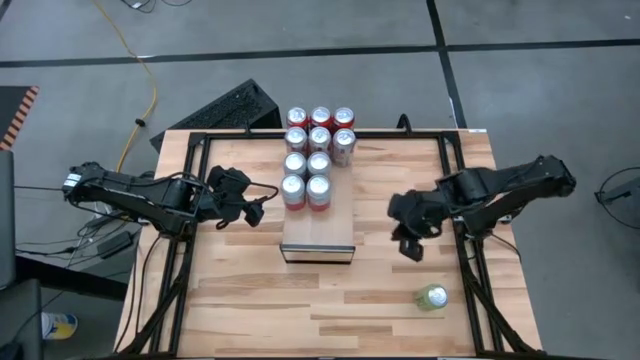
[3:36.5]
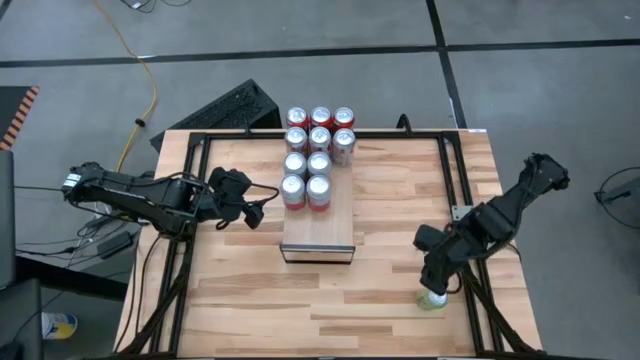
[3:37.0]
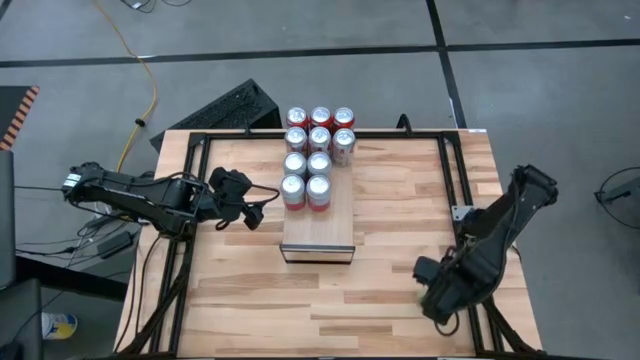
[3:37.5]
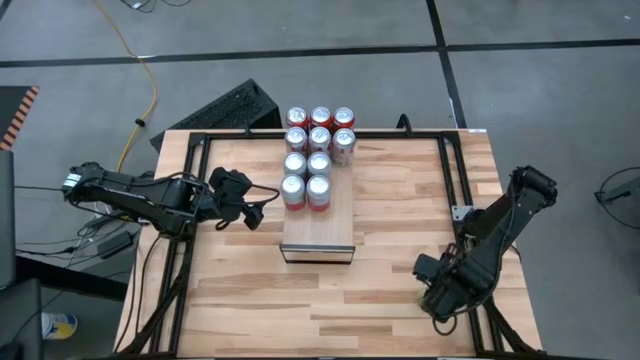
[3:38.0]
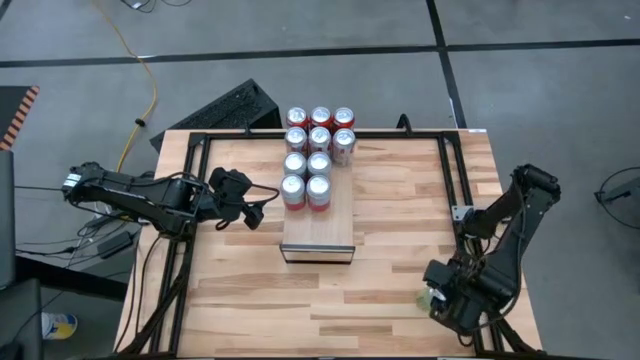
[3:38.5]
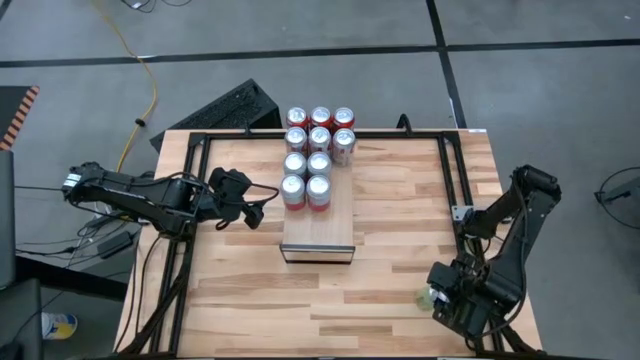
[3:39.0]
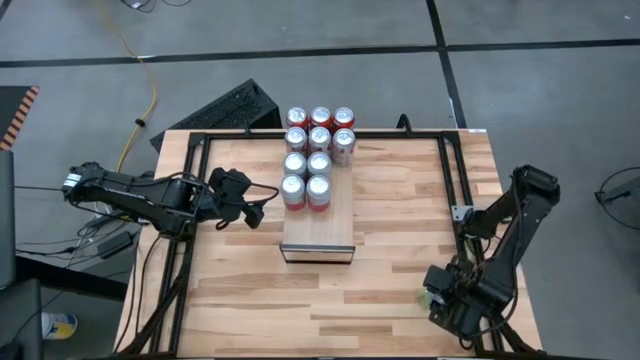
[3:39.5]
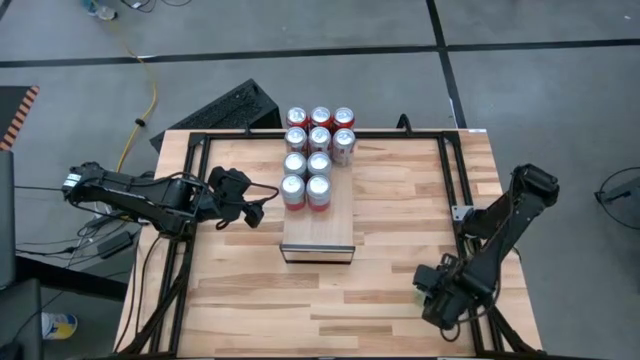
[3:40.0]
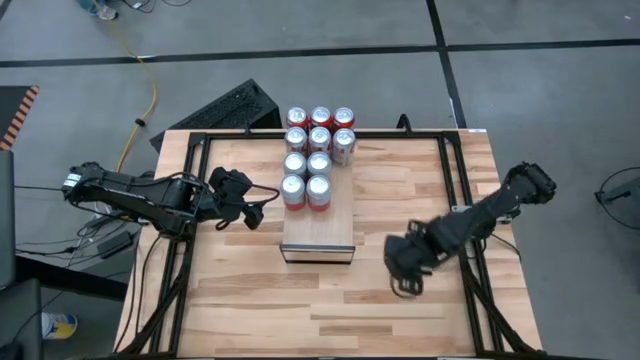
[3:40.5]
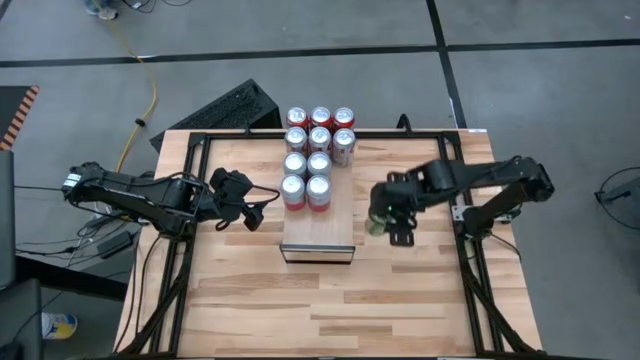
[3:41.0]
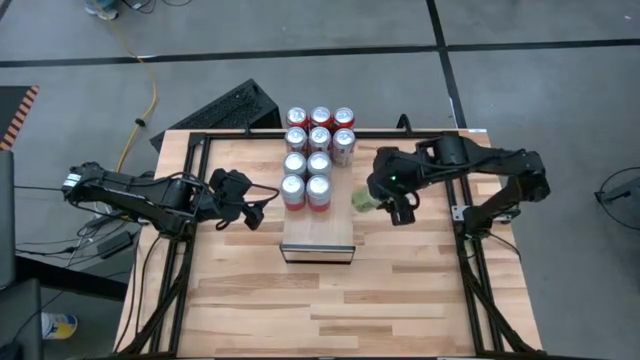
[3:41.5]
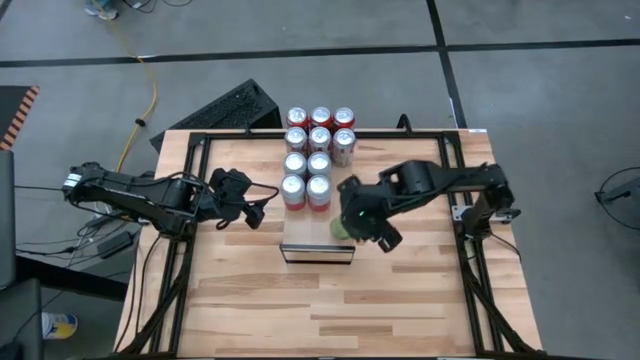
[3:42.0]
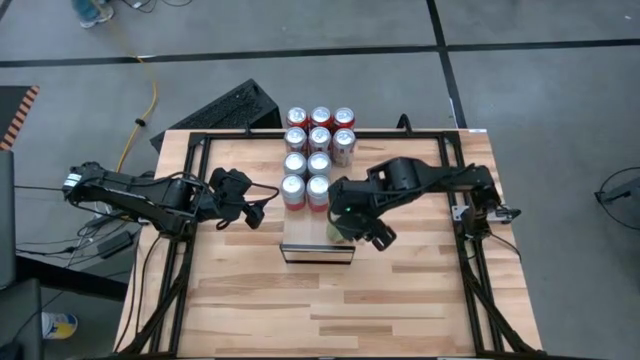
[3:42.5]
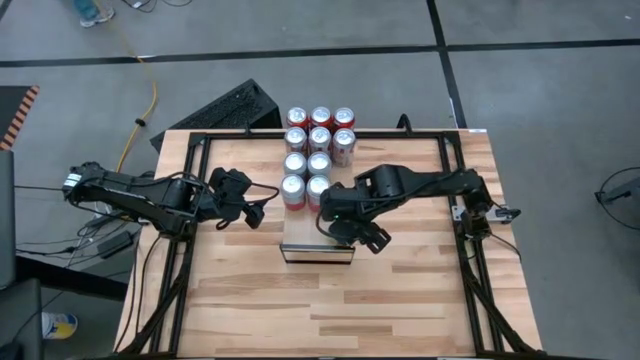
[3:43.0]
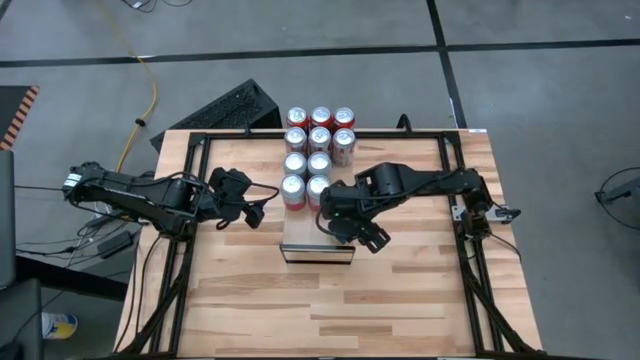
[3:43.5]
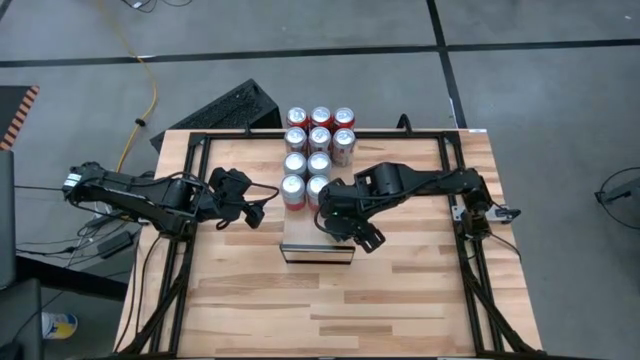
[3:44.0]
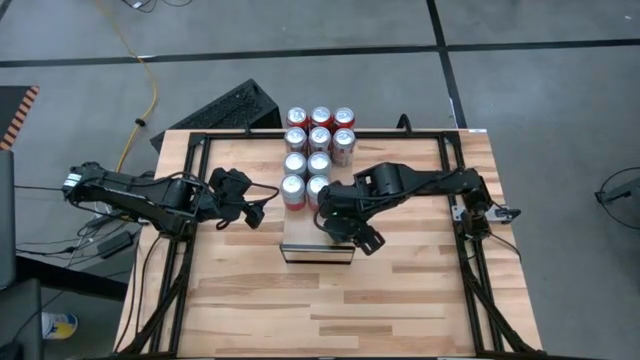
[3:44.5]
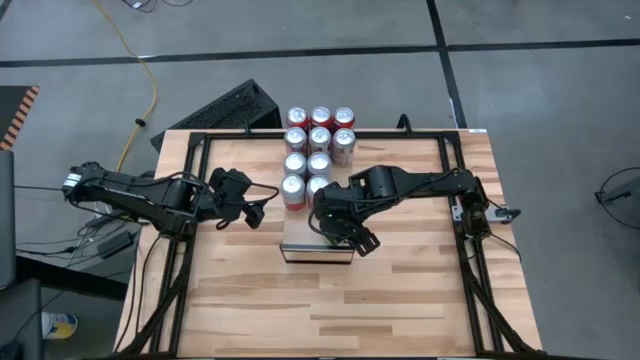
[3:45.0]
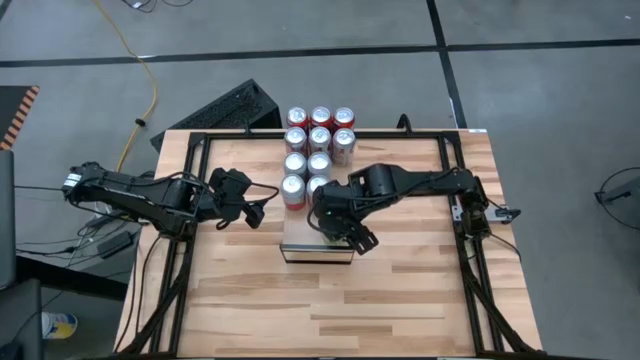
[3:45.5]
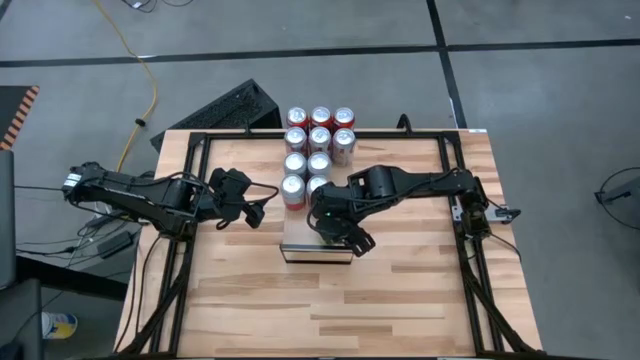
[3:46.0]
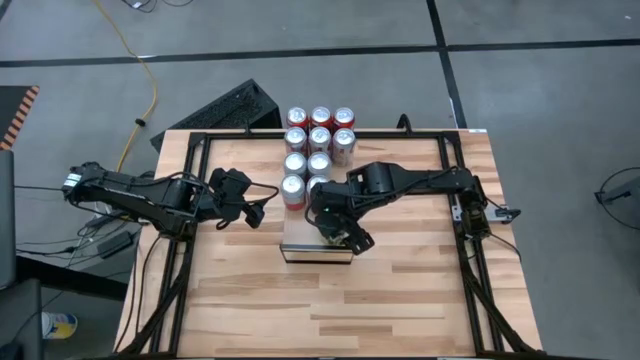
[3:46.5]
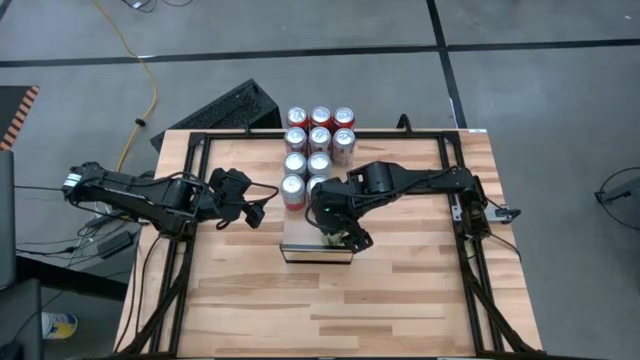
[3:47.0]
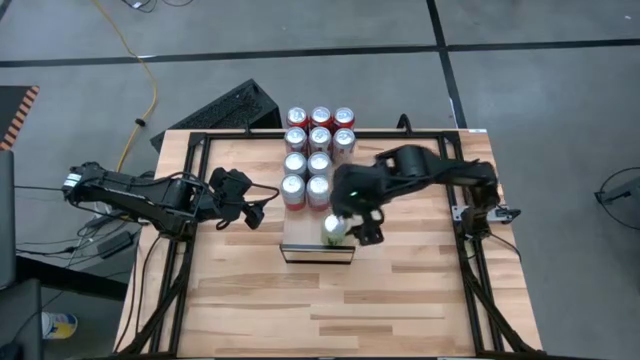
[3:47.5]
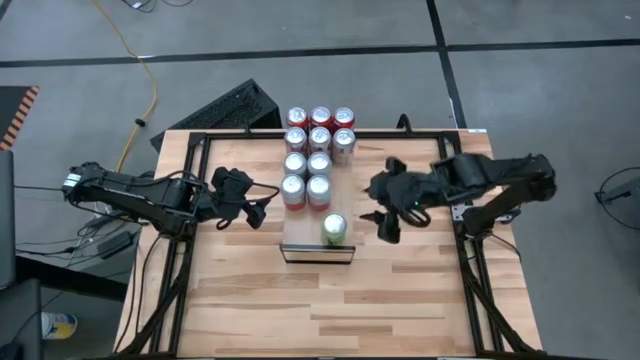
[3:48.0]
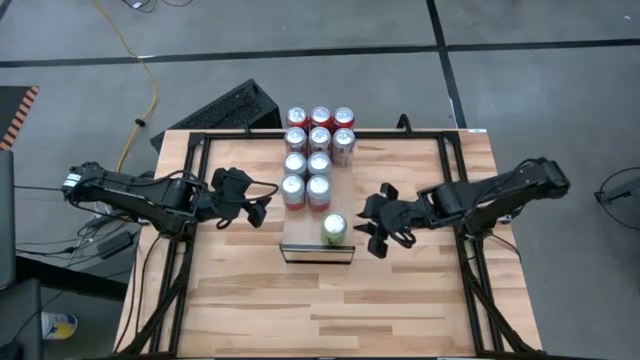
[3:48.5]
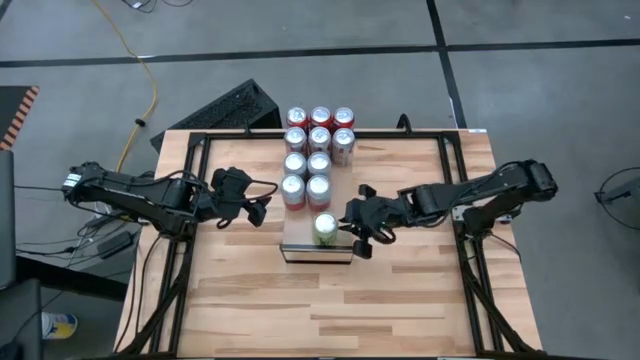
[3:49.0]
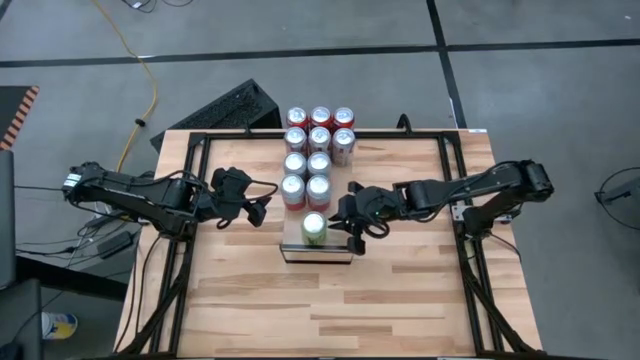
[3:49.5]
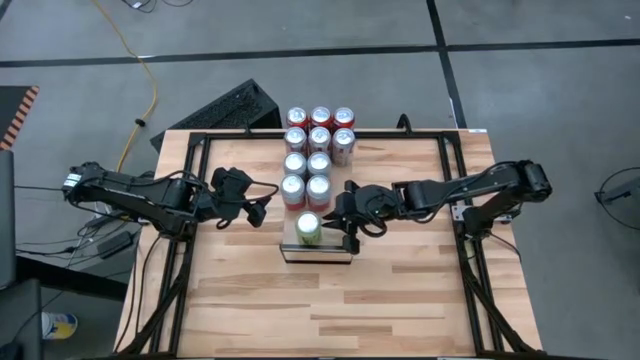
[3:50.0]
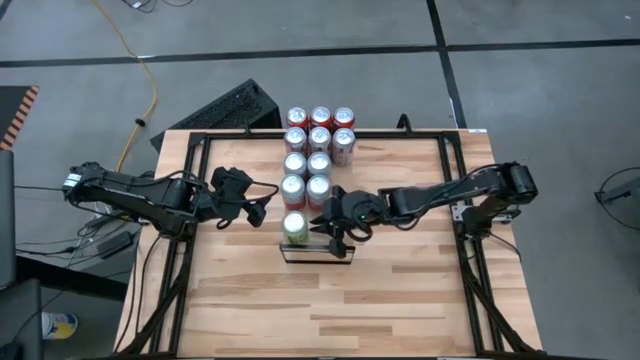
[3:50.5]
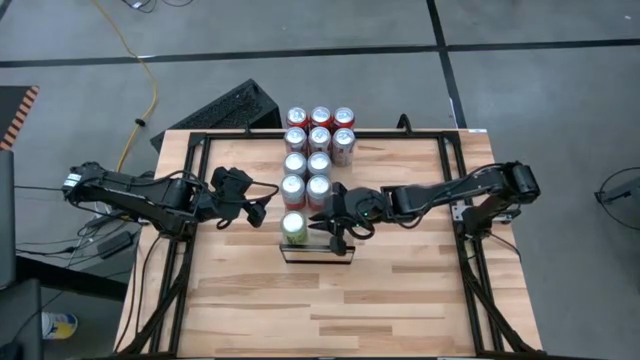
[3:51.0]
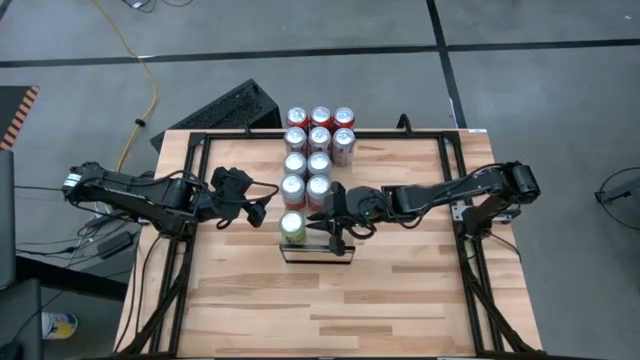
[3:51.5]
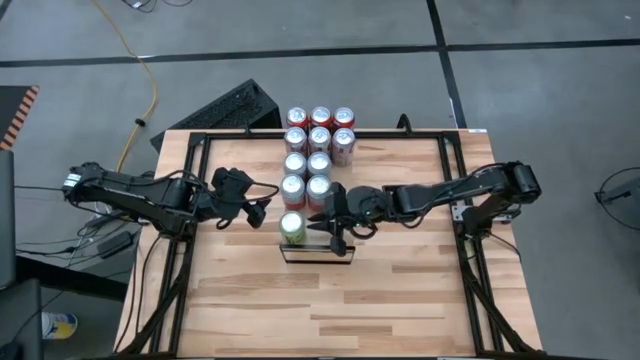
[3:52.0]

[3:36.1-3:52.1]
Task: Place canned beverage on shelf
Put the green soda can on the shelf

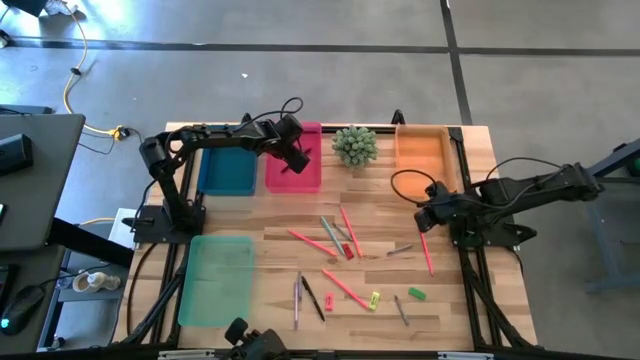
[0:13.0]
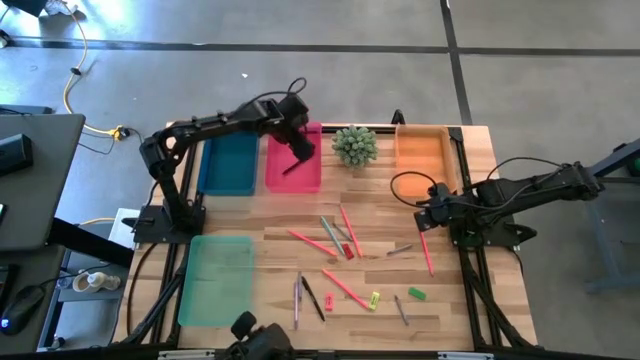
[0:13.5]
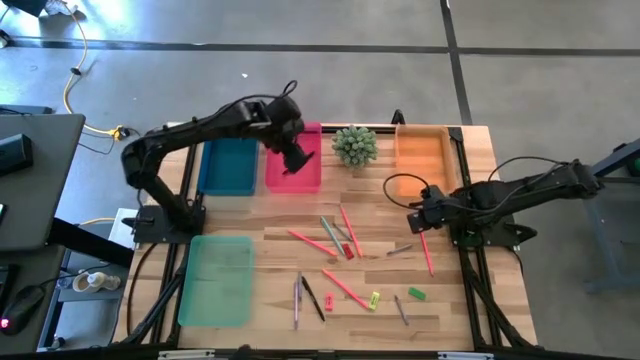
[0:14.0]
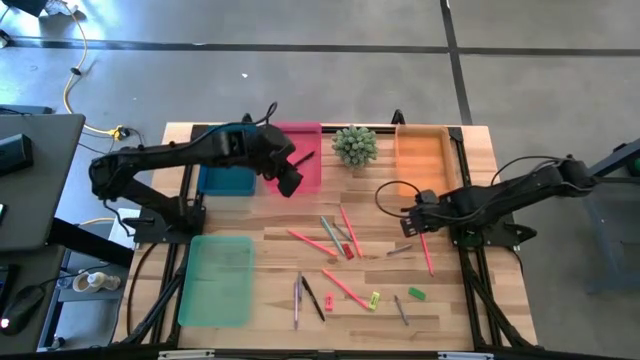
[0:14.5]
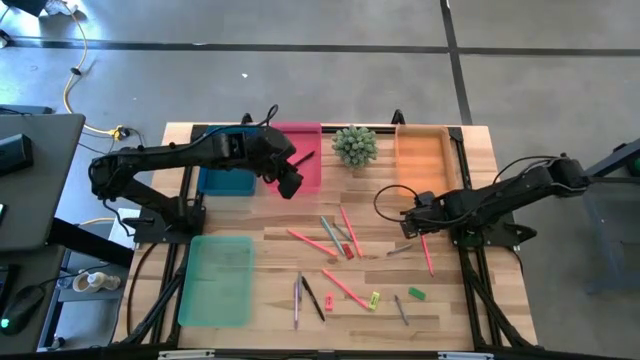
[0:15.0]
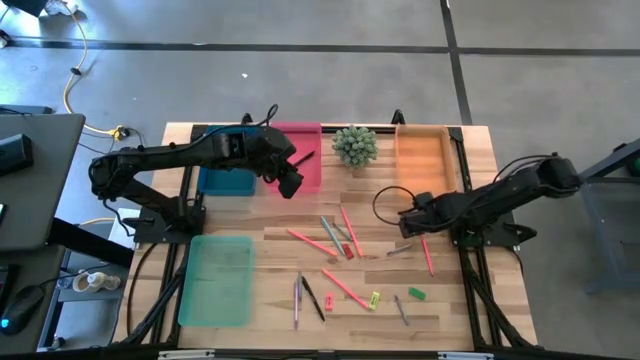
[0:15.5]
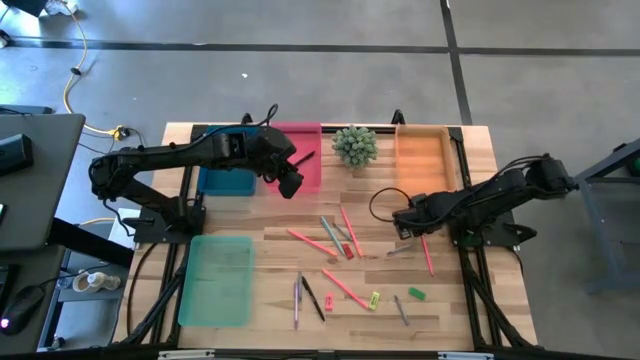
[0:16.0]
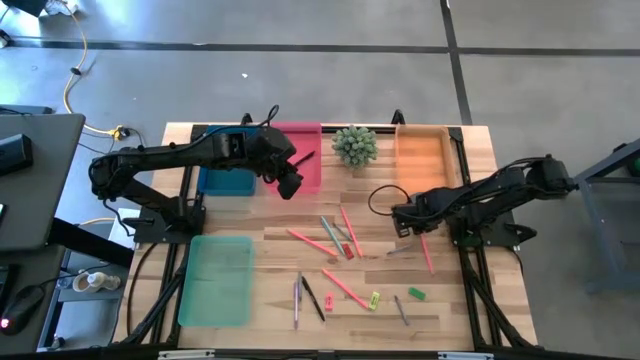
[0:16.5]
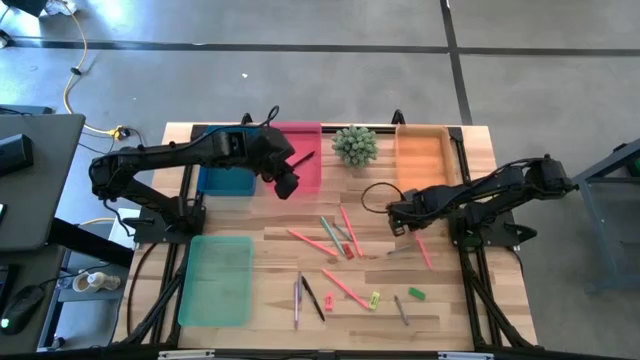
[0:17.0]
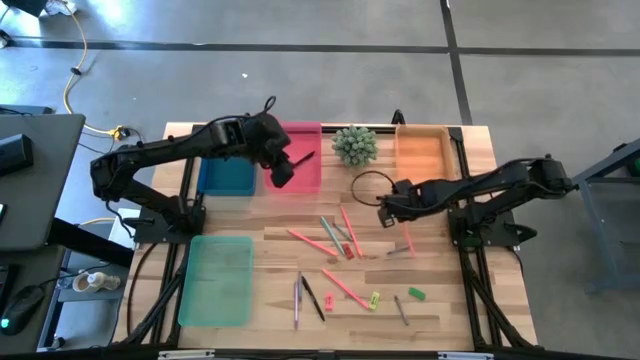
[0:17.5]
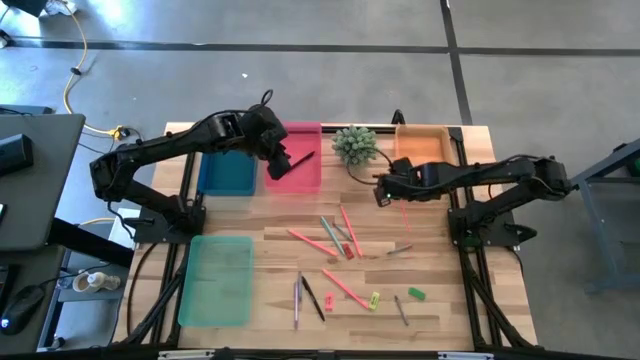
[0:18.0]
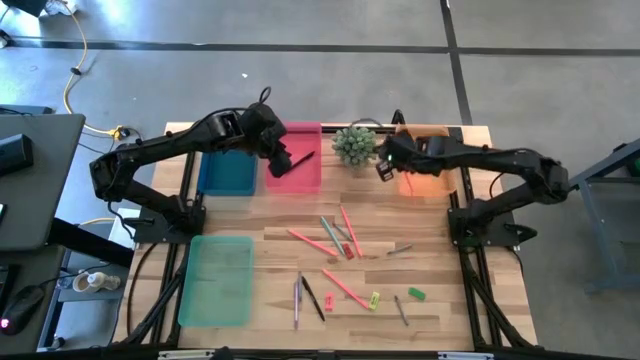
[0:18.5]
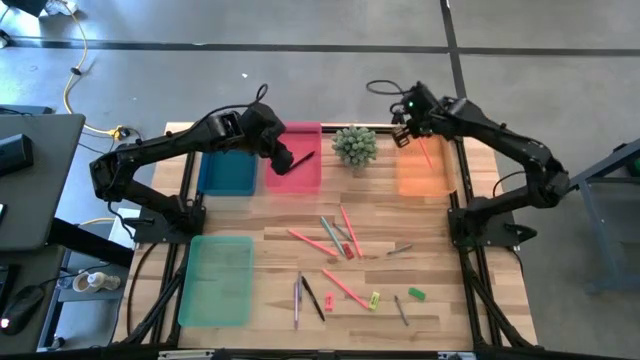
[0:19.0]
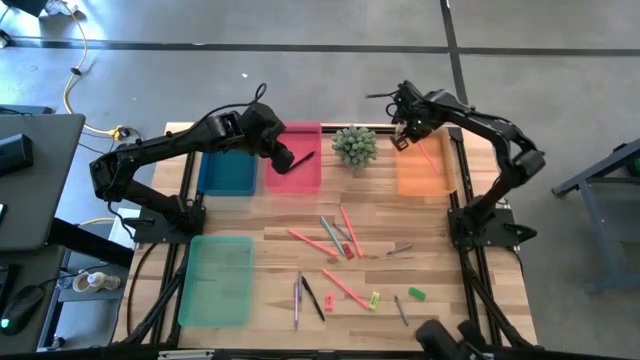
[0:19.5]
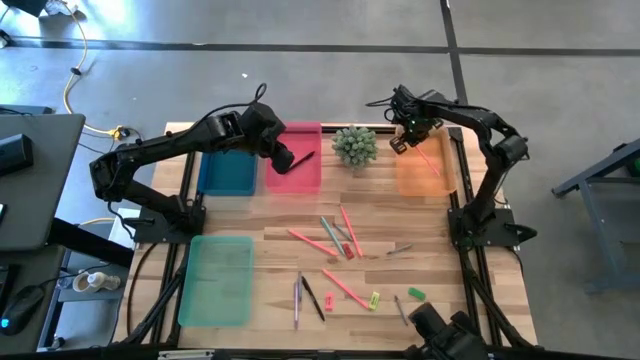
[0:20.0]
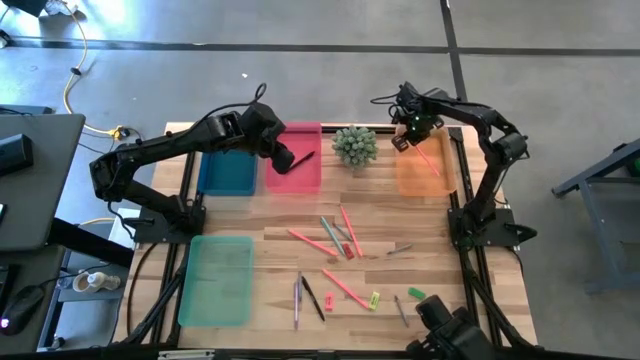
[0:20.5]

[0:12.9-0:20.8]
Task: Sort crayons/erasers/pens/pencils in bins
Put the pink pencil into the orange bin
